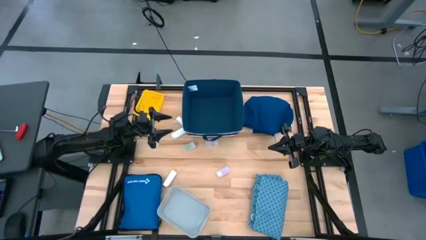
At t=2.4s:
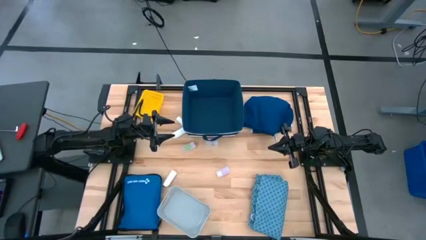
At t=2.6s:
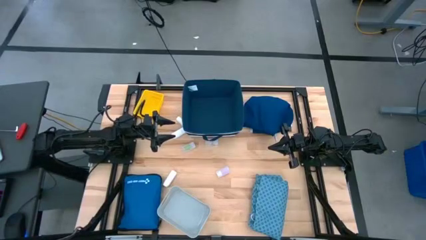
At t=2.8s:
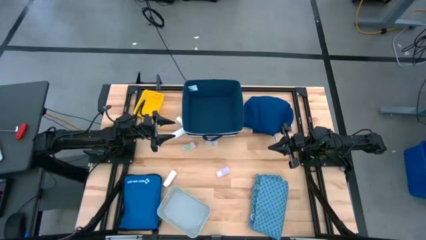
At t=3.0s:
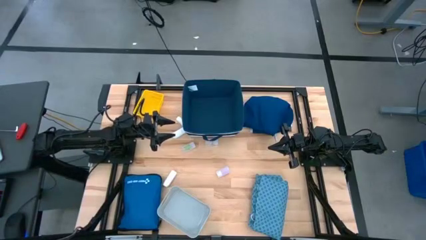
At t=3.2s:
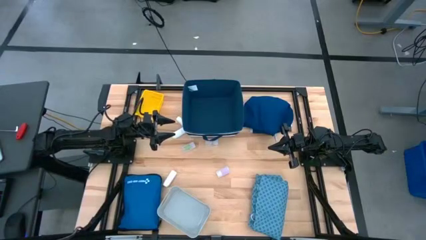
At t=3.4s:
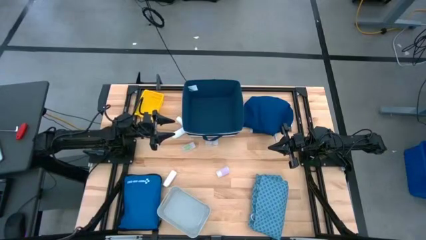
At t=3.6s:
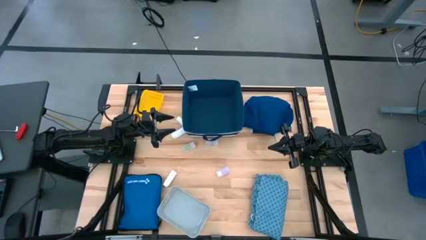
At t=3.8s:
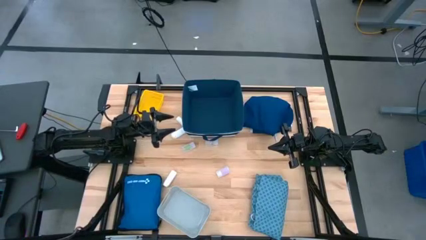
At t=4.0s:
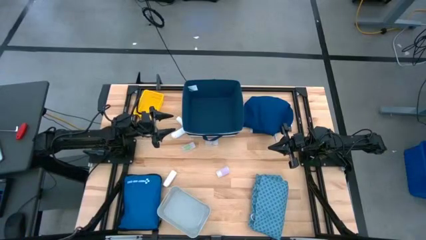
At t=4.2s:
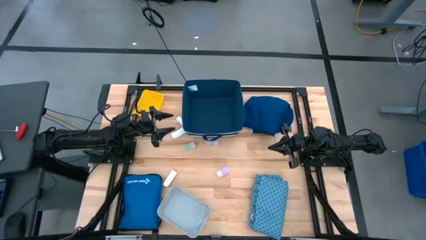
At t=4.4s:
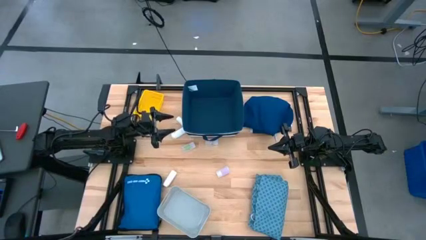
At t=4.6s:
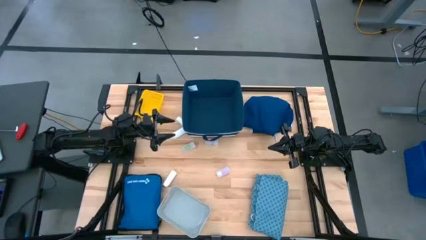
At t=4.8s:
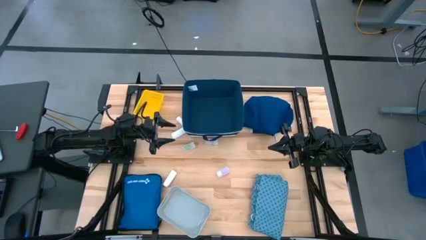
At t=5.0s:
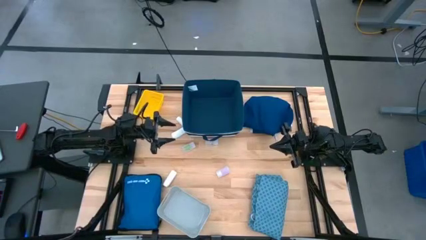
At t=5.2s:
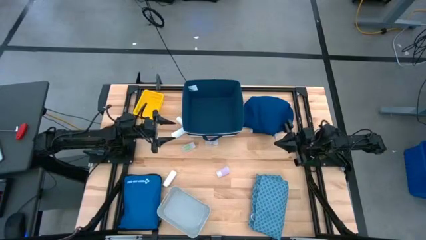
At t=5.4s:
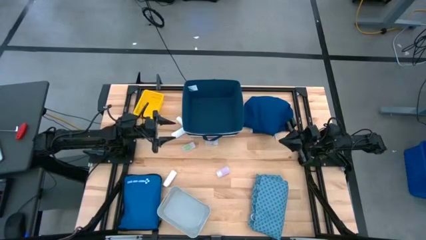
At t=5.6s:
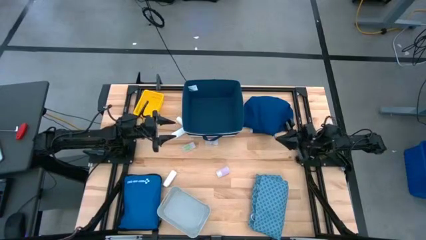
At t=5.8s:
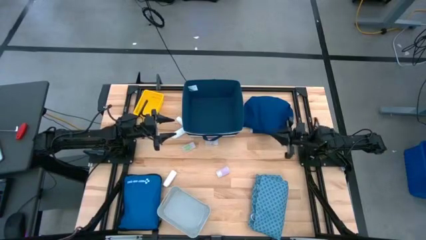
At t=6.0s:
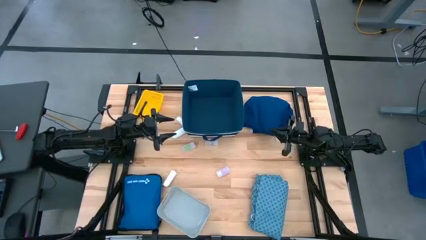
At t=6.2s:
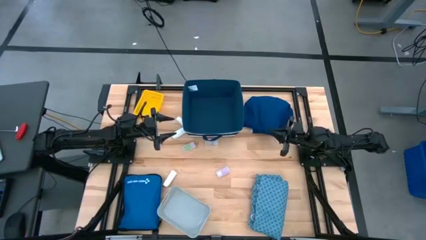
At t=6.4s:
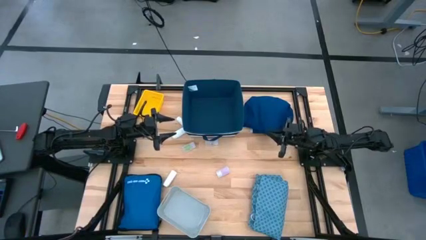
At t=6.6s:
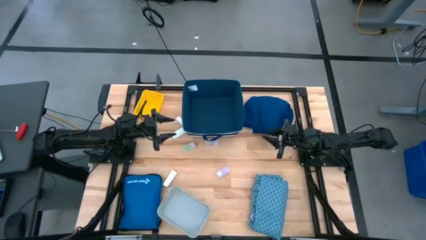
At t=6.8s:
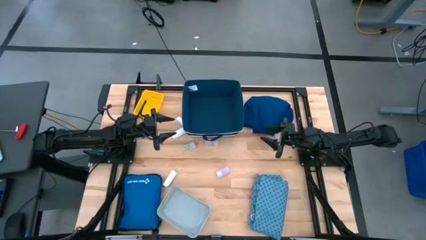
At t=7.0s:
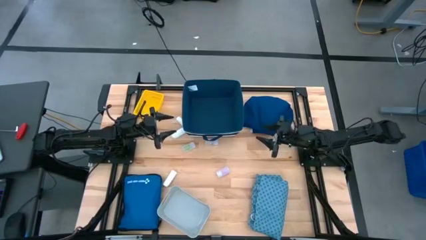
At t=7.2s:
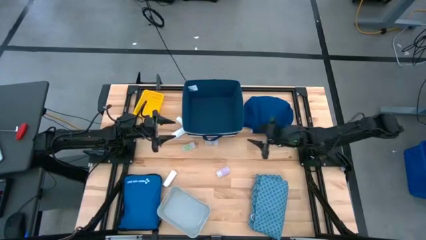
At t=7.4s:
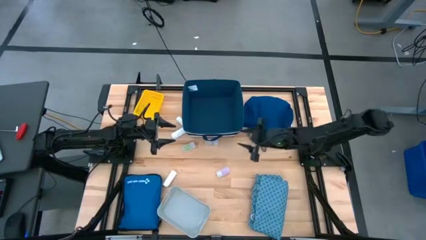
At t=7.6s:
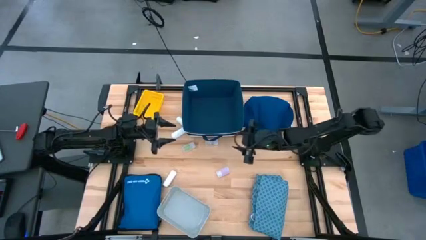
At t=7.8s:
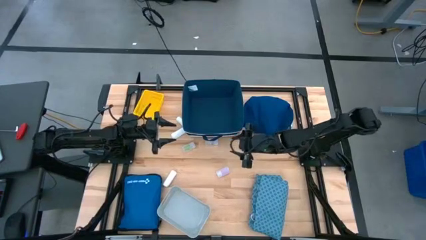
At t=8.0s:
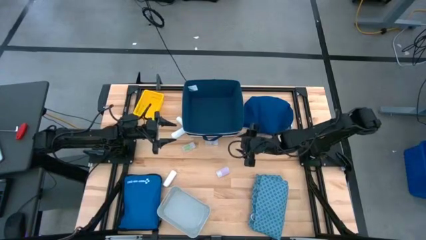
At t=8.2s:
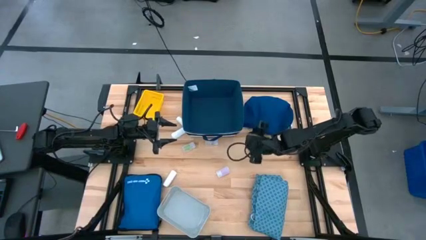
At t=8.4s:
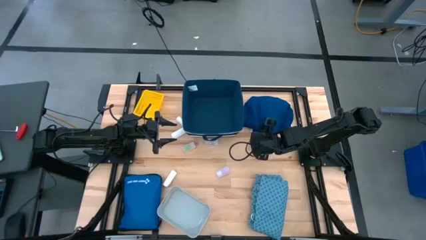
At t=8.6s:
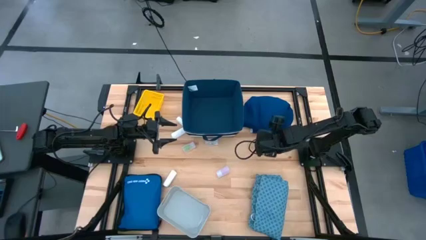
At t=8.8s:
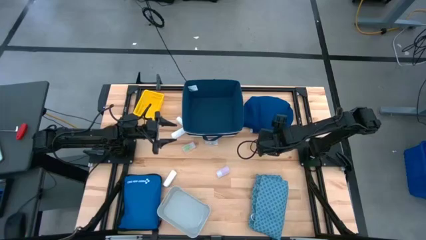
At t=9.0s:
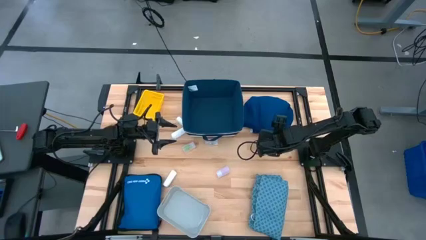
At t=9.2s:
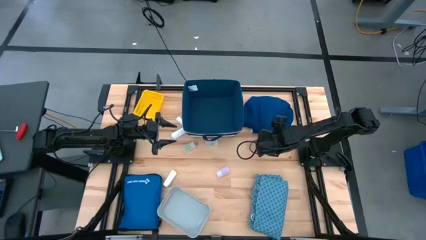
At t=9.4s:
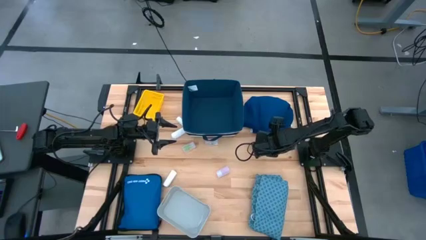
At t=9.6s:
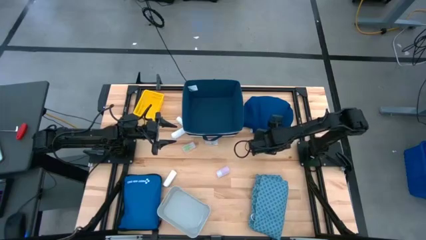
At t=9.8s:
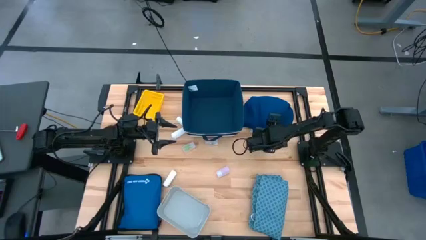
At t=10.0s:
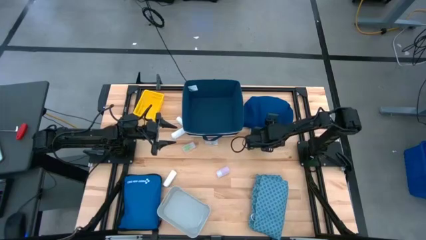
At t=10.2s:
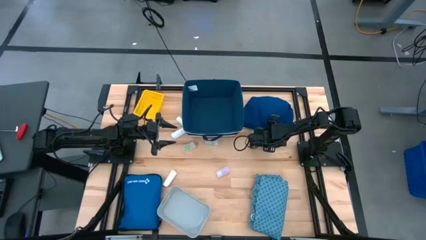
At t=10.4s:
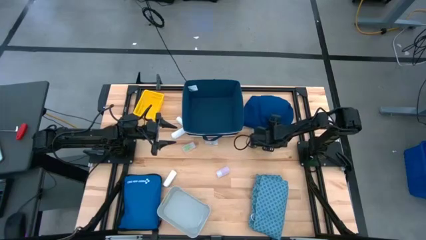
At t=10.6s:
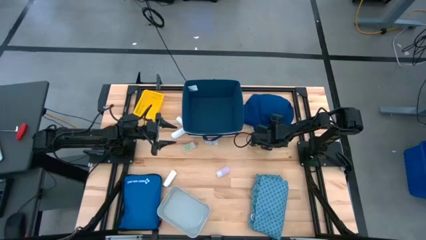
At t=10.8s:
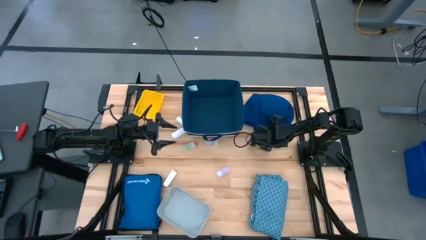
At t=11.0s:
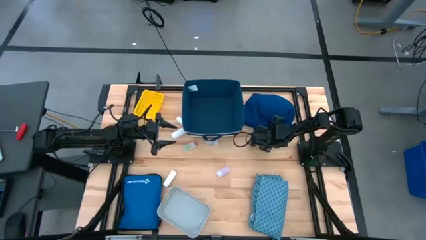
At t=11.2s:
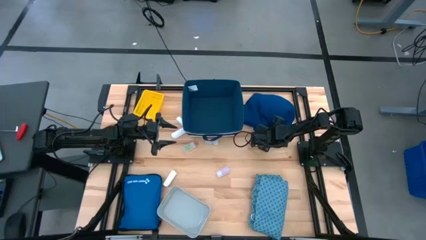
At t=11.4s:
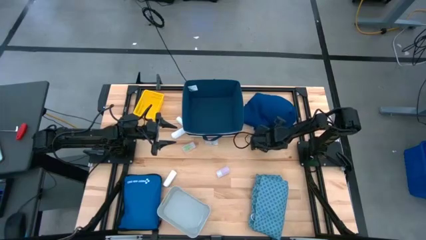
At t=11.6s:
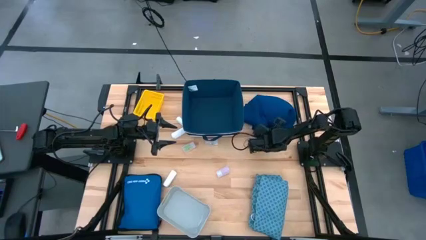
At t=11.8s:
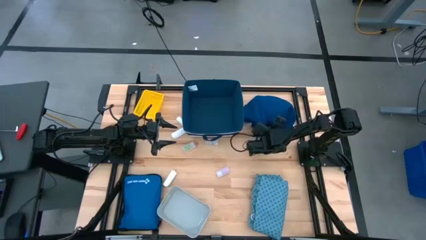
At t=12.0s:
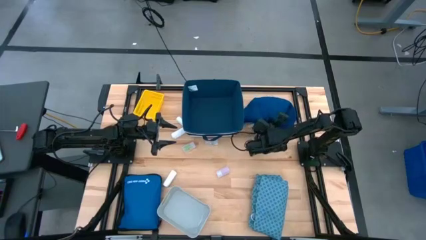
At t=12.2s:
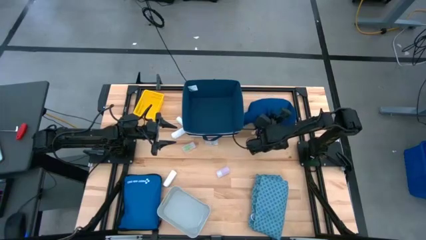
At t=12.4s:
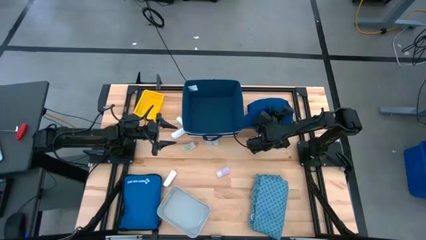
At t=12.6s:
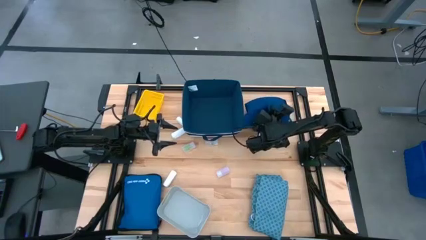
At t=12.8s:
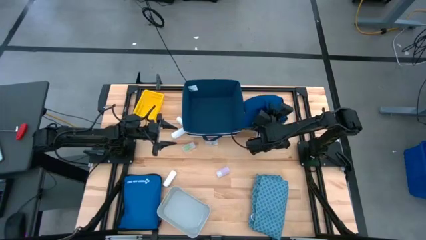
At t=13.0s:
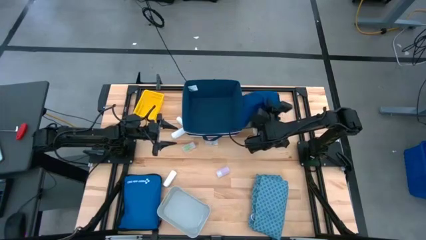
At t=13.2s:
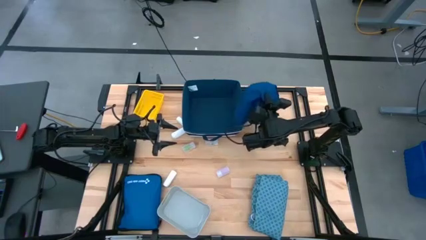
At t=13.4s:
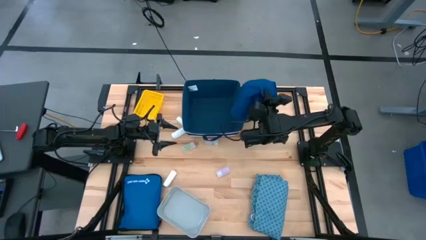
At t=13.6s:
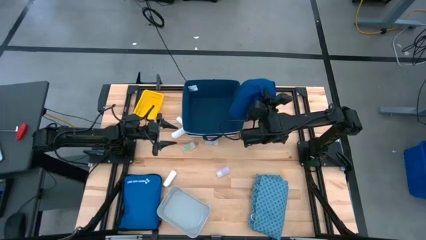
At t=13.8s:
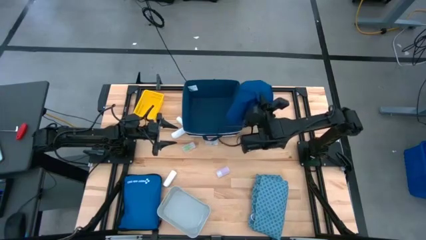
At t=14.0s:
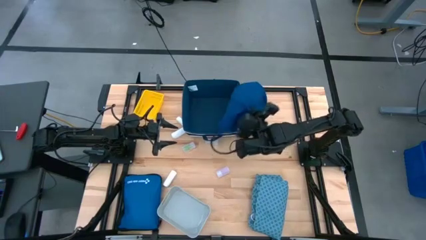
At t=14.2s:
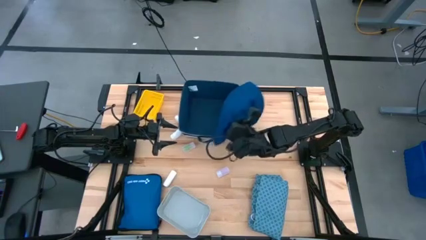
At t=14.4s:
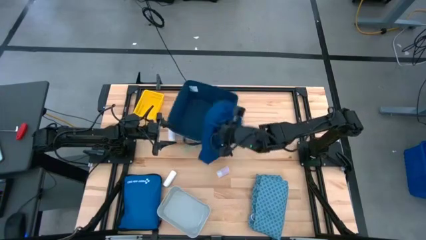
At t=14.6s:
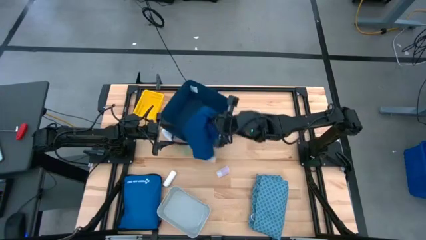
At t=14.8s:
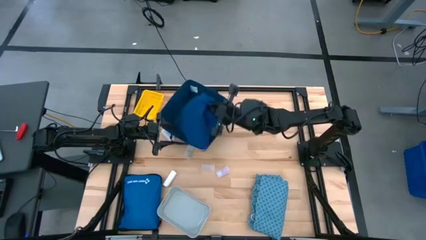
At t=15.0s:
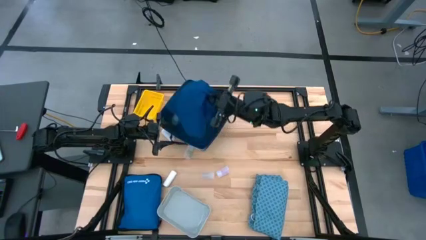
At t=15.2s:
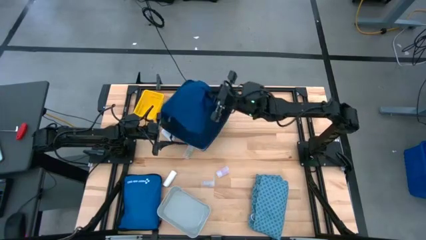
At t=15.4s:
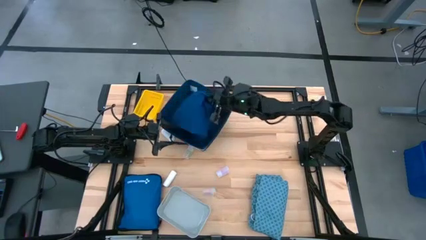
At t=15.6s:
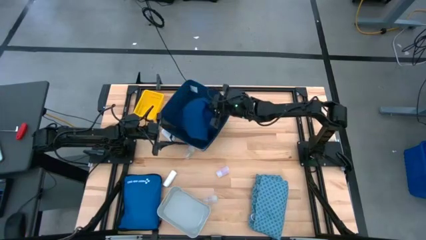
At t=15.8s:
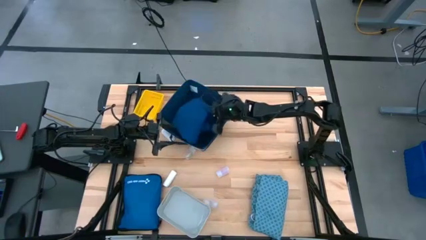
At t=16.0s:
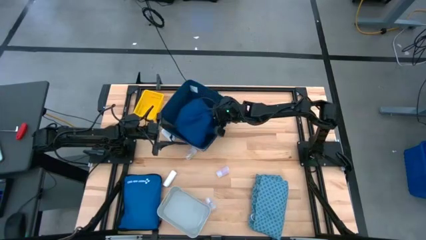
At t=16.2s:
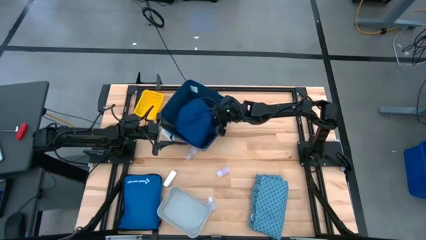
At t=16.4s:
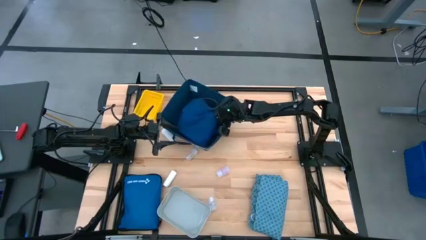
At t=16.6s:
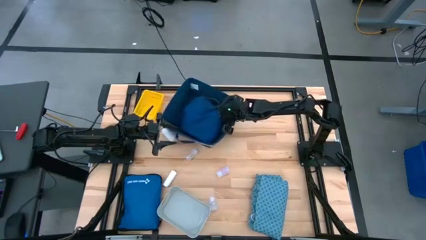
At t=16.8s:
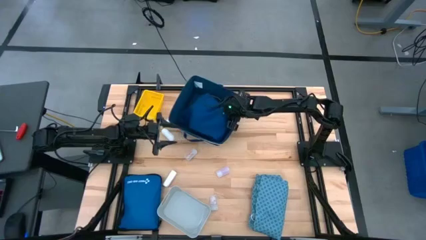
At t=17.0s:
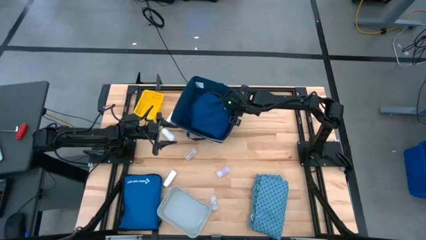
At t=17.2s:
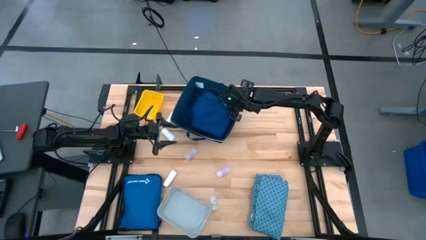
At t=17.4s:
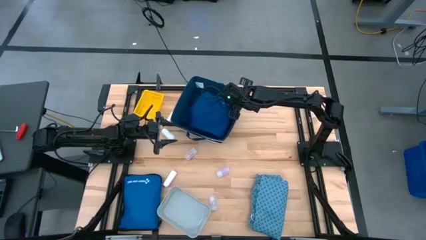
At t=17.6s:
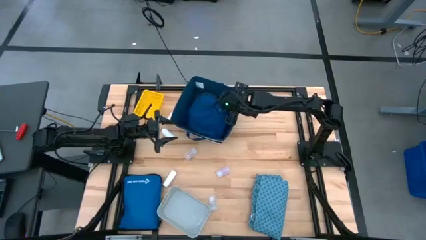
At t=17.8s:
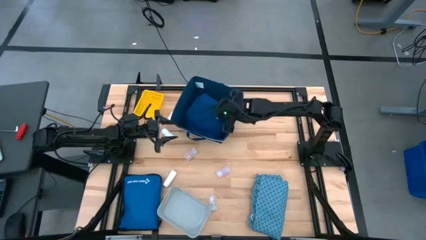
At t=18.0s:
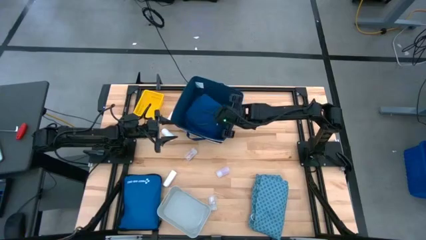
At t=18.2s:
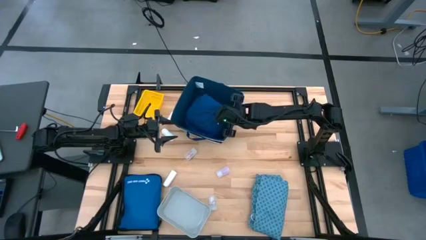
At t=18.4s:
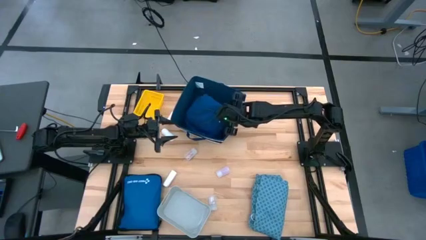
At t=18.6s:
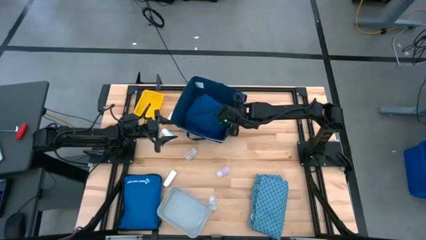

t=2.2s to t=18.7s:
Task: Pick & place medical supplies in basket/bin
Put the dark blue patient gown into the blue laundry bin
